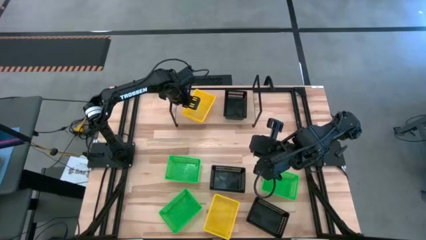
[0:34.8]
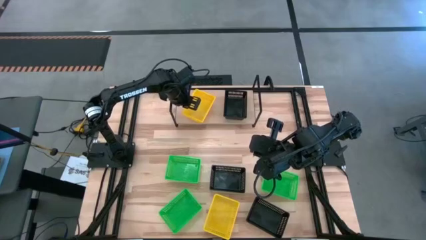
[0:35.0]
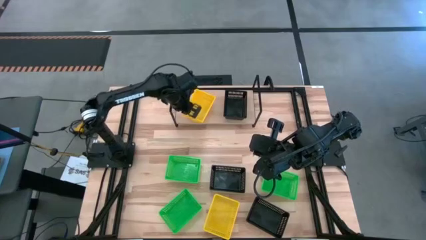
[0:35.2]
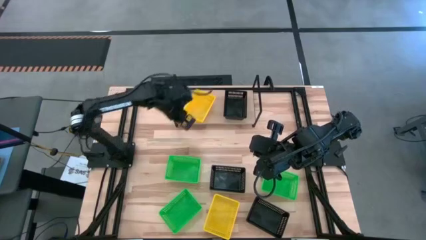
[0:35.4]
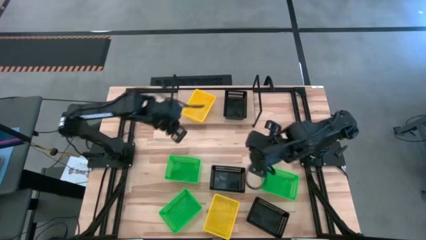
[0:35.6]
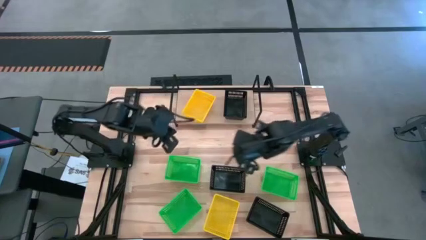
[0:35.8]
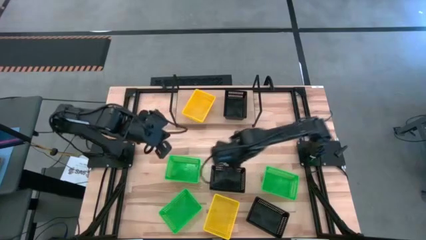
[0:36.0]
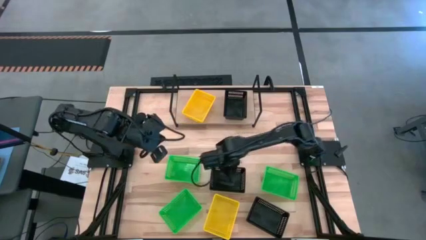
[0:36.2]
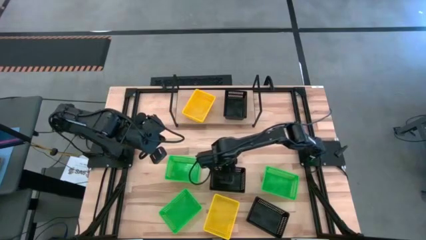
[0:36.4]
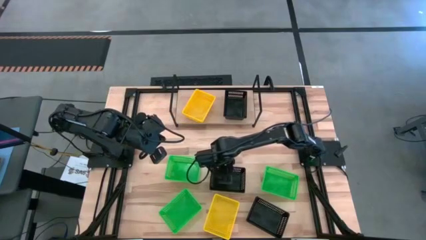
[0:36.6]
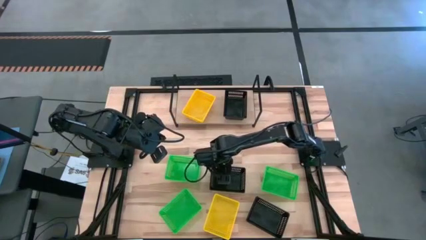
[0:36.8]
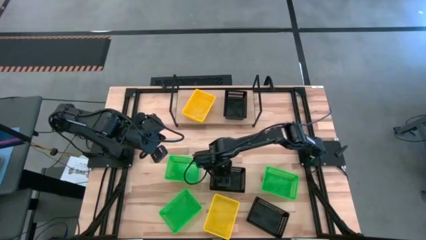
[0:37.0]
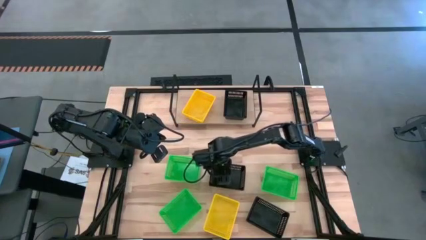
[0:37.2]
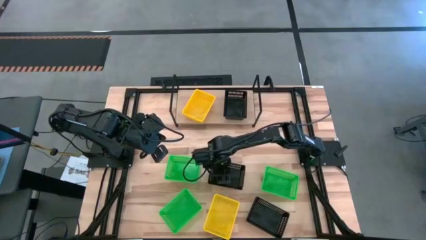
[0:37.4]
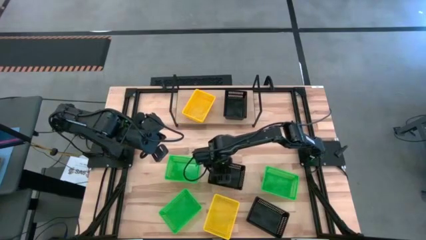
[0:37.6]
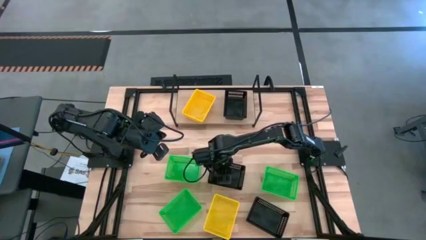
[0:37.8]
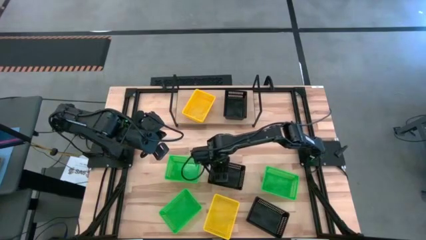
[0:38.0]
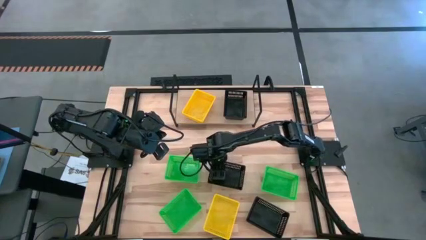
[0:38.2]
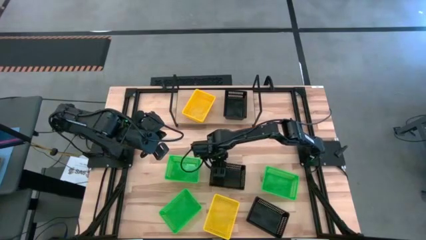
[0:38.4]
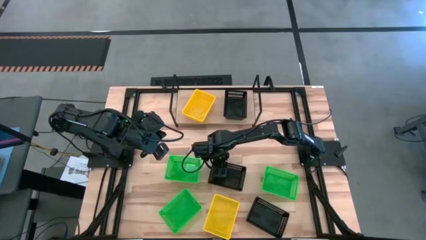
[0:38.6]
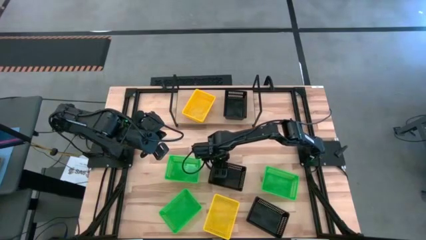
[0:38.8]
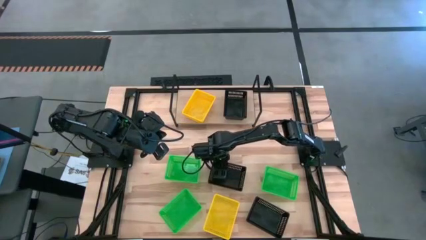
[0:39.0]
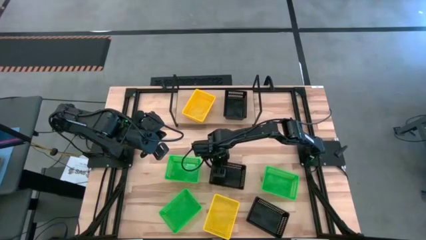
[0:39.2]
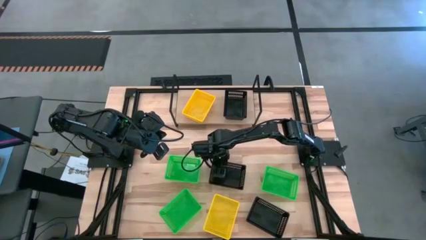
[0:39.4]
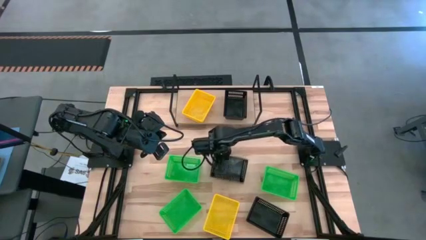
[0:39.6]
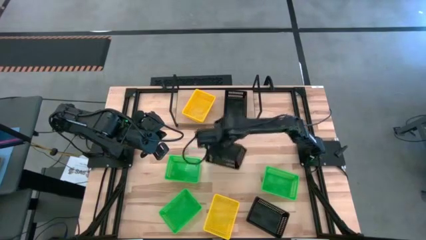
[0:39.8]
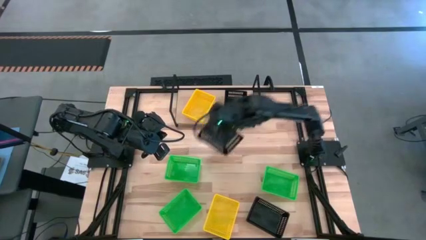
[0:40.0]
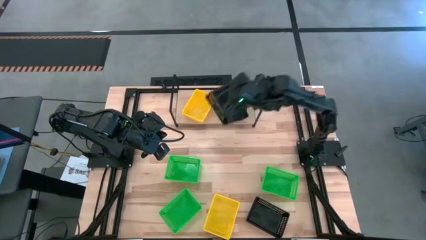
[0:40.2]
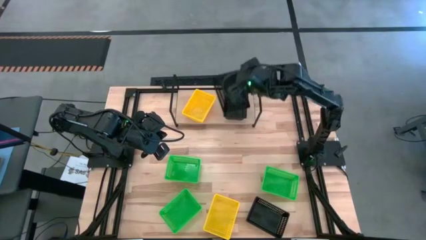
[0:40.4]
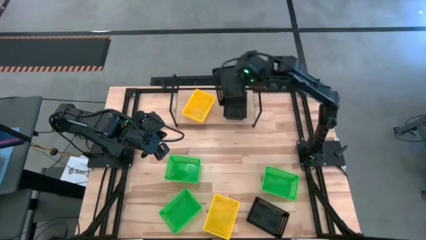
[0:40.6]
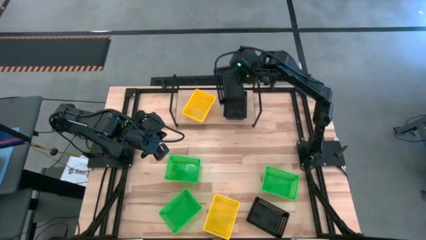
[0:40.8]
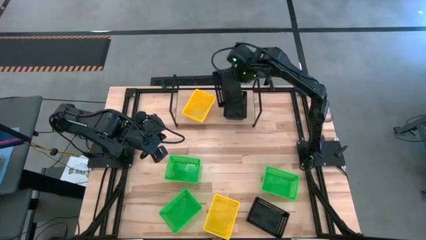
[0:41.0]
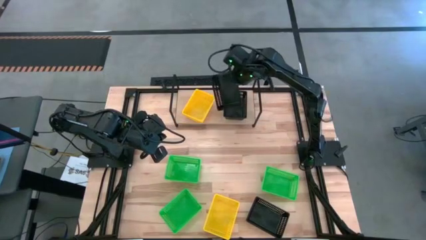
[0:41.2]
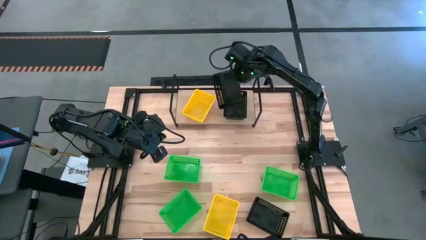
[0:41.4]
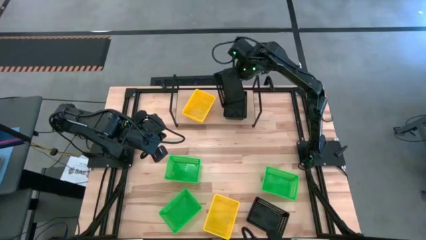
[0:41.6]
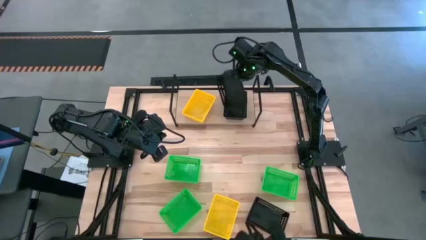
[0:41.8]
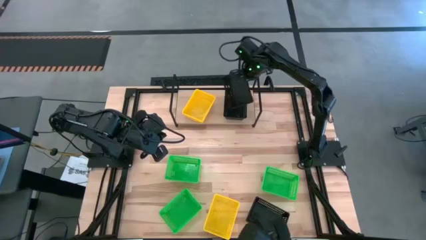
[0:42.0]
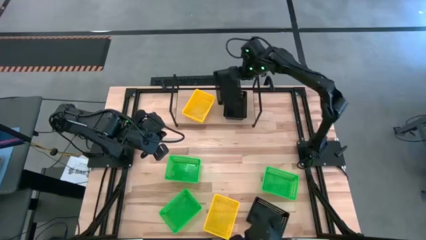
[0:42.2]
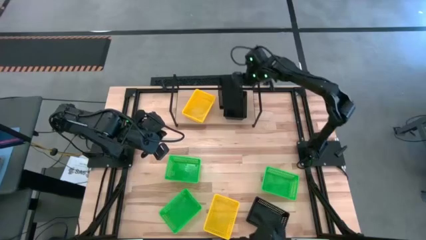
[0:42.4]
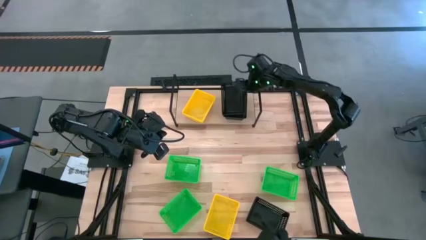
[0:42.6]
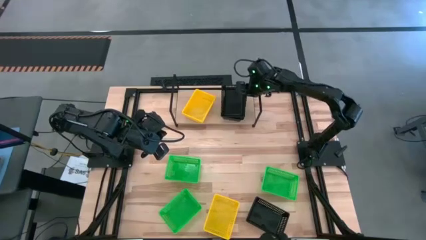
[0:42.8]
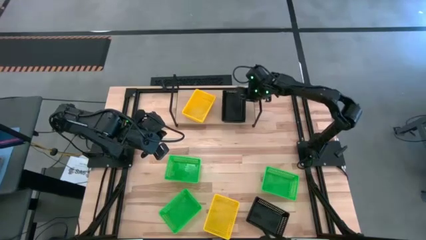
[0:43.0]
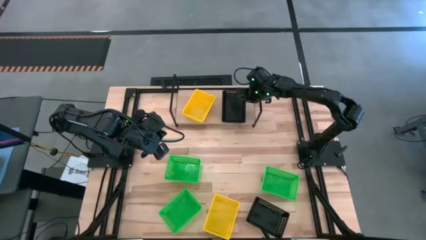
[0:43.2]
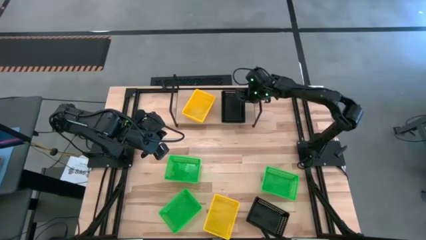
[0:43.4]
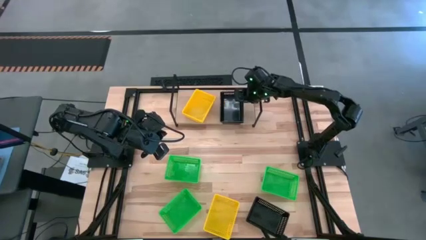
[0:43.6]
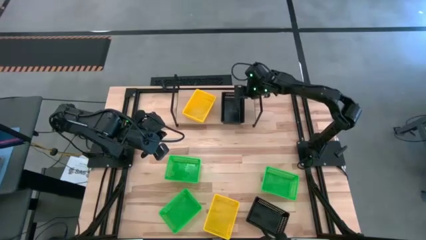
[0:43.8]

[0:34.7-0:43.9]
Task: Stack baskets on shelf by color
Stack the top black bin on the top of the other black bin on the shelf

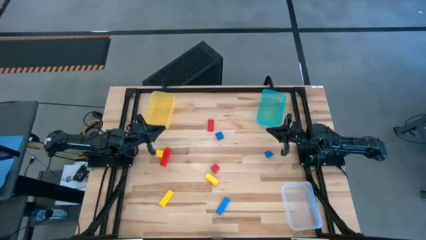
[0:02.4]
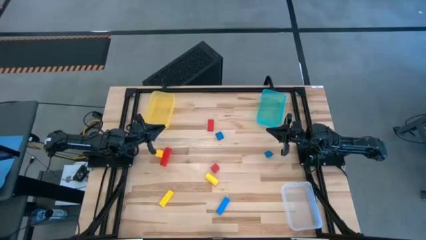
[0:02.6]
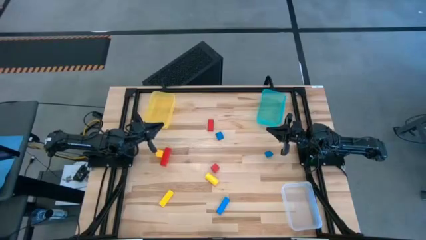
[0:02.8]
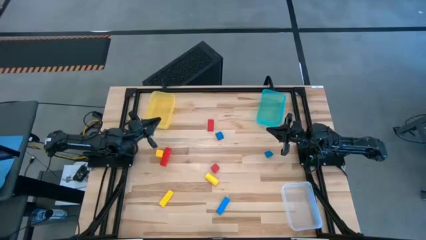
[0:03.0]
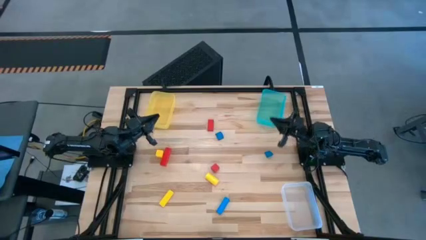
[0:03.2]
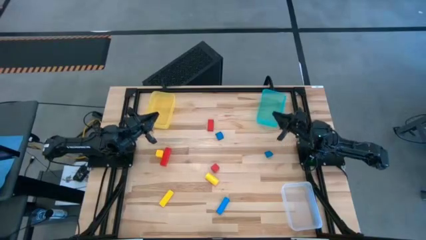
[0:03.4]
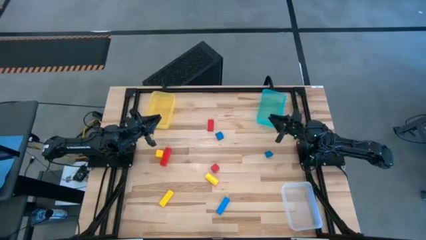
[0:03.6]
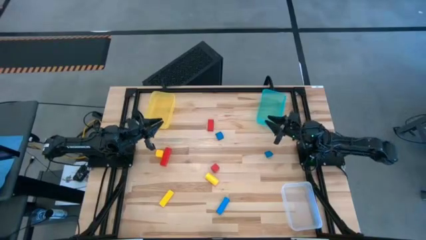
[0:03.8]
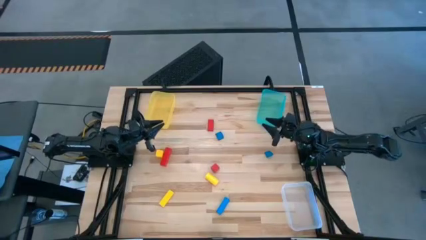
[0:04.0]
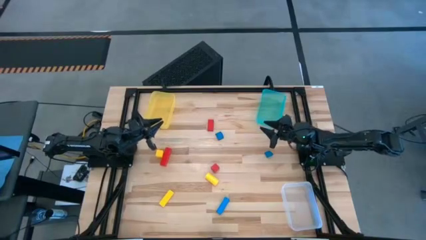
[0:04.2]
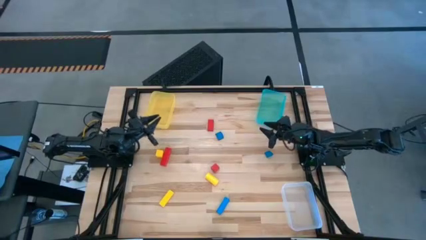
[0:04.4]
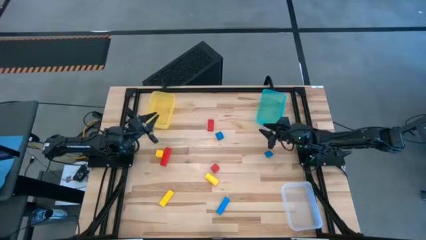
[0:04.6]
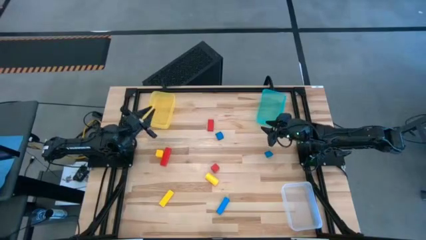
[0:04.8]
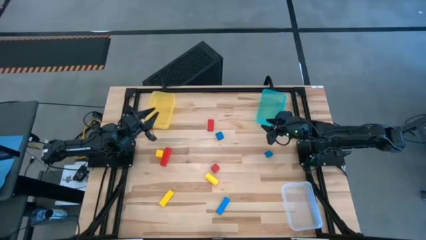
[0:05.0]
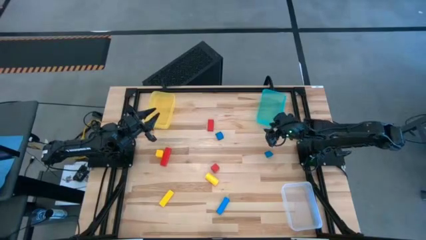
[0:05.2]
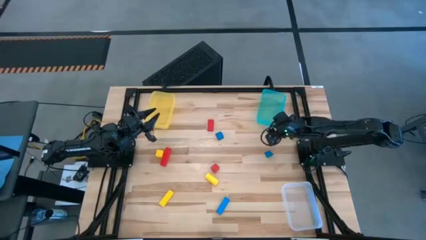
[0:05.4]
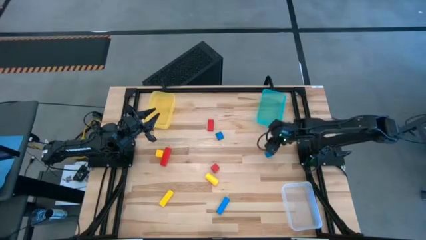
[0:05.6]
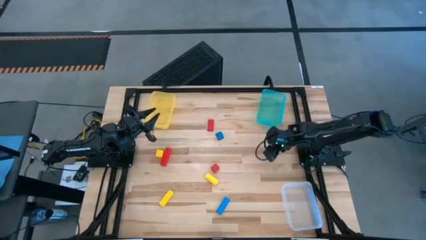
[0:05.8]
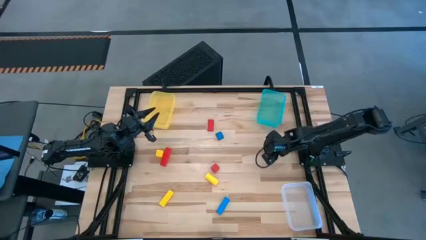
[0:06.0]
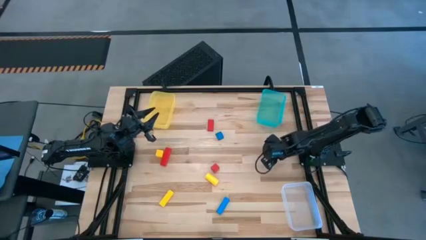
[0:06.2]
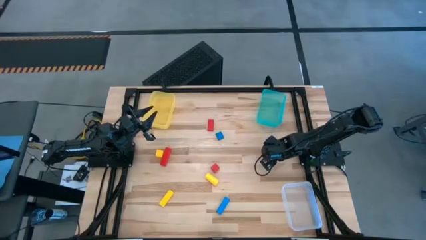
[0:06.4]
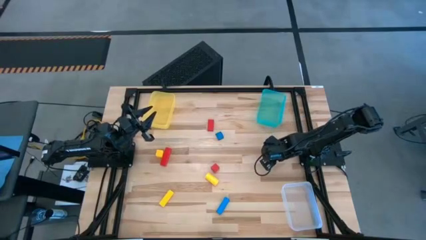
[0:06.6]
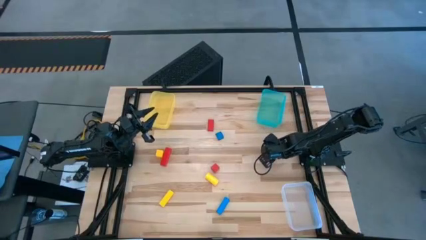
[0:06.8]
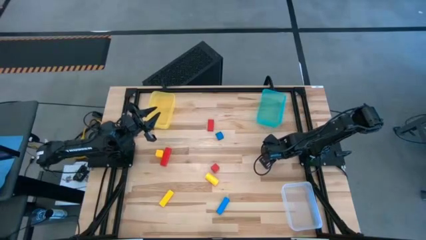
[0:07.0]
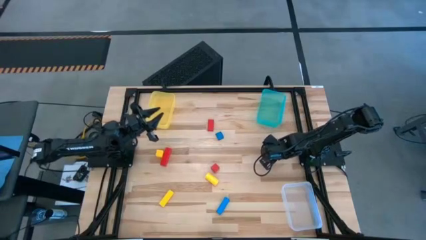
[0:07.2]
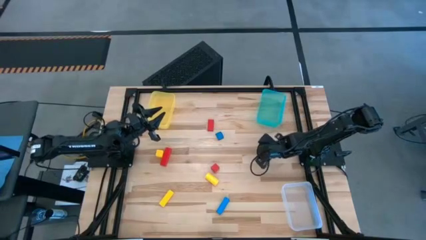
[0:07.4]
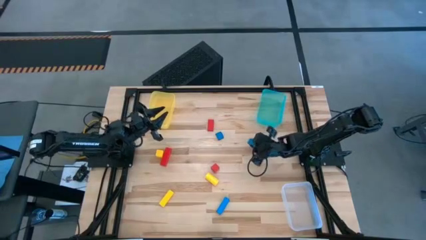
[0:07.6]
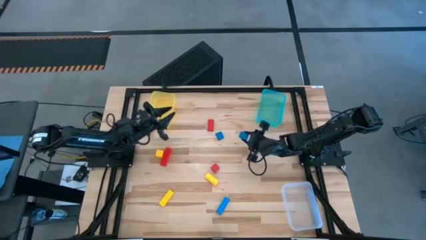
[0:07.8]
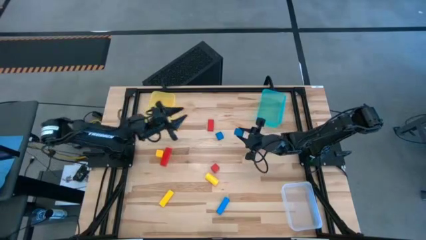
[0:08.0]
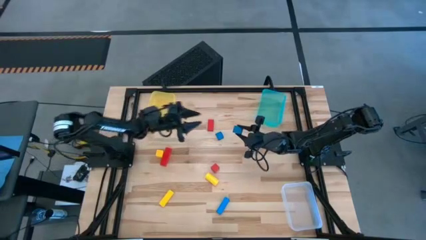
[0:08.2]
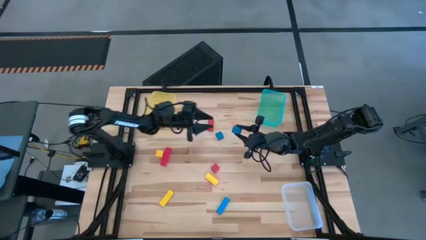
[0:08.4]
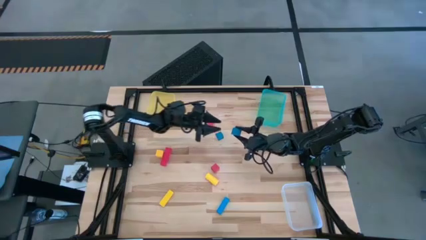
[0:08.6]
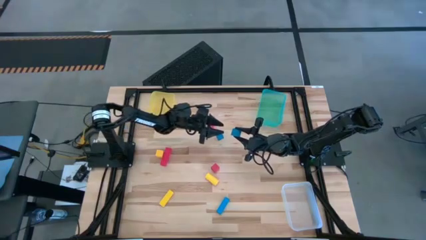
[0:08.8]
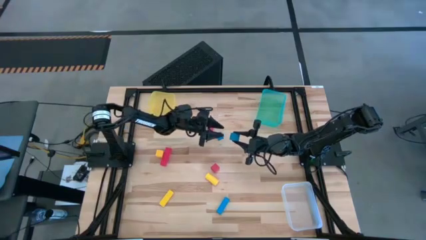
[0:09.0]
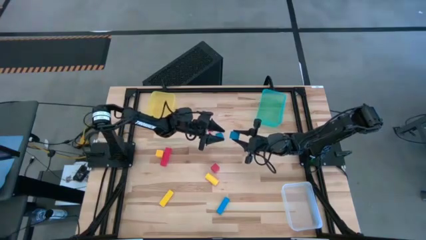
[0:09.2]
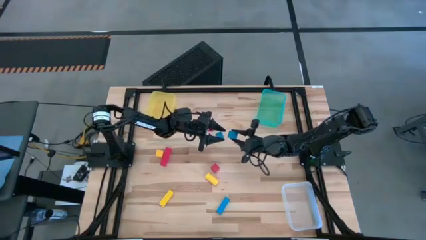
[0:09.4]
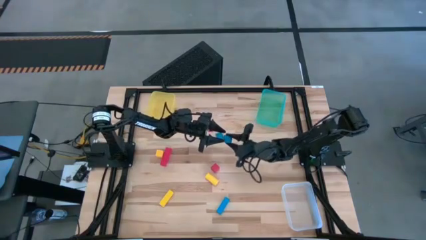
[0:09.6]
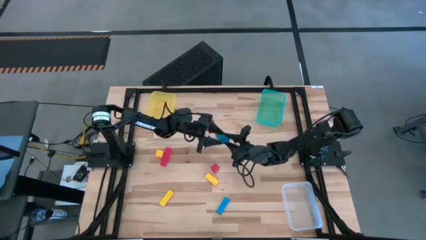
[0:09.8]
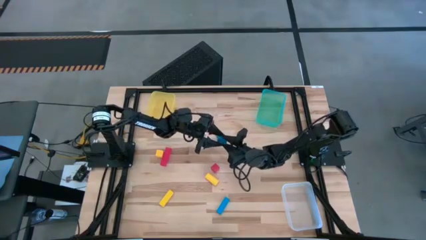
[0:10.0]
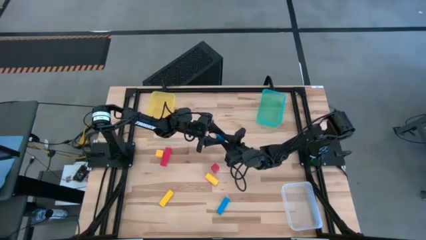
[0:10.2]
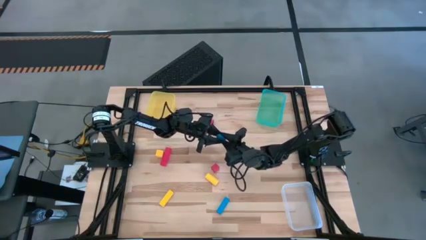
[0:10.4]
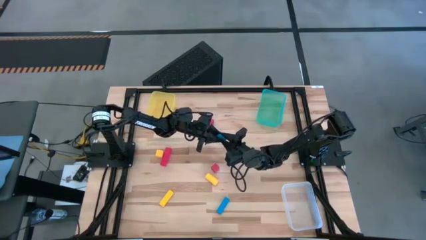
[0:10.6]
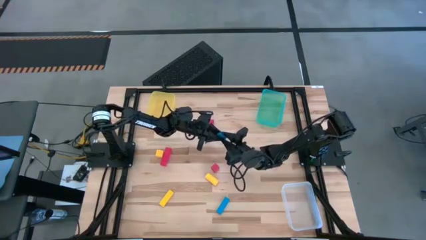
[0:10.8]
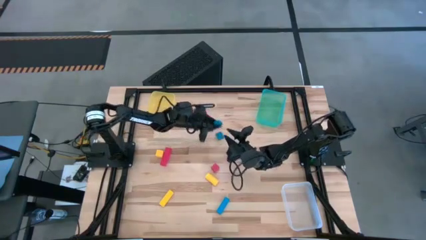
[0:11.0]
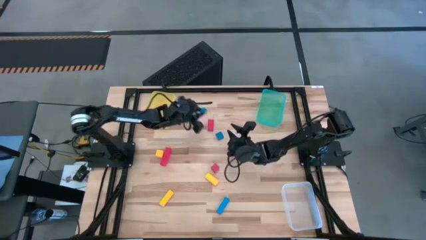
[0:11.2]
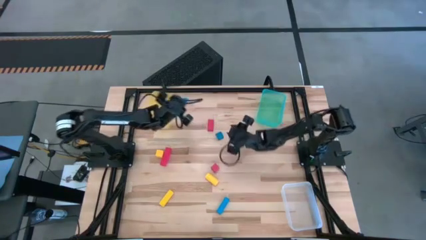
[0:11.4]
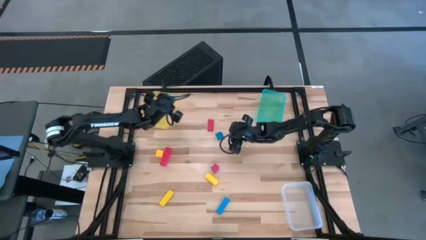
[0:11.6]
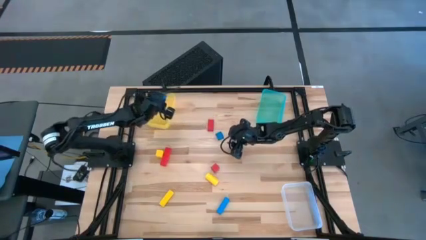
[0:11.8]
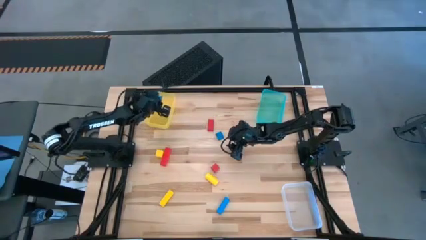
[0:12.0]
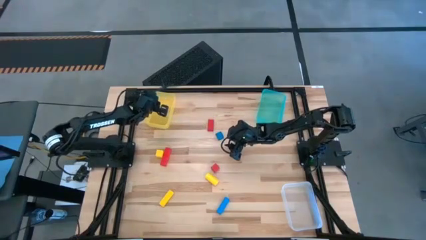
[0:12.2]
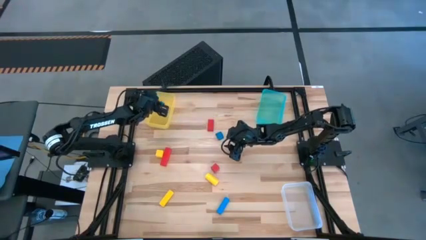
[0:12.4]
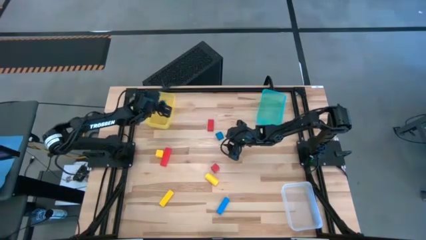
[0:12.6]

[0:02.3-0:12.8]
Task: Sort & place blocks by color
Put the blue triangle block into the yellow bin
